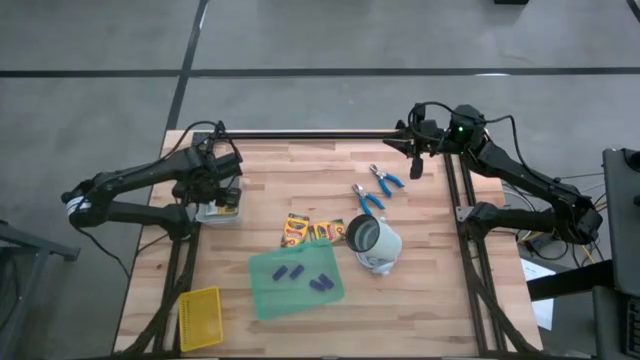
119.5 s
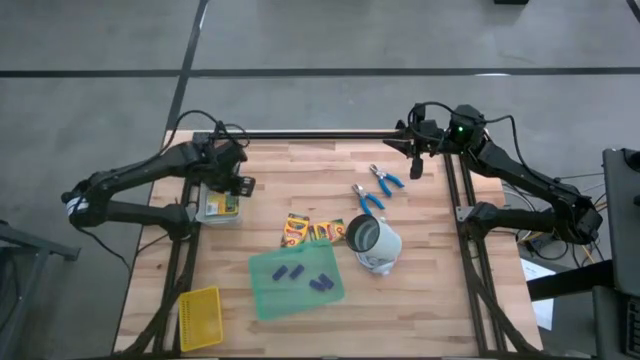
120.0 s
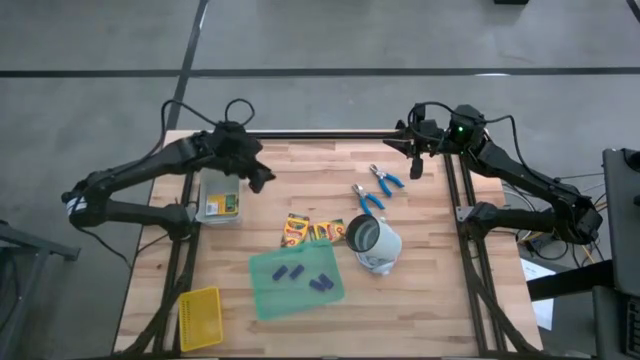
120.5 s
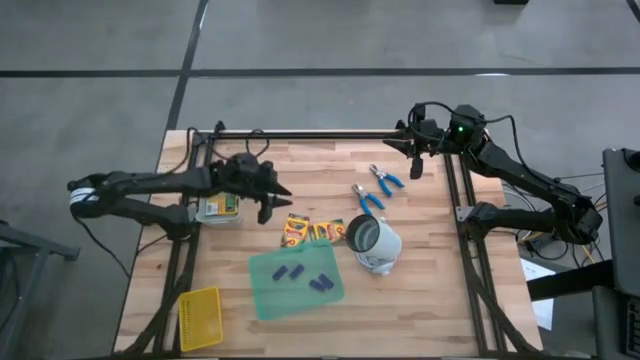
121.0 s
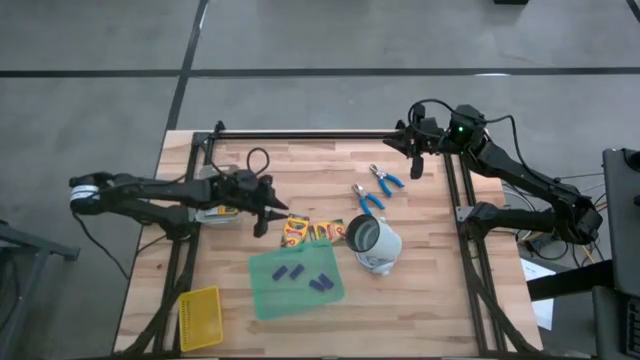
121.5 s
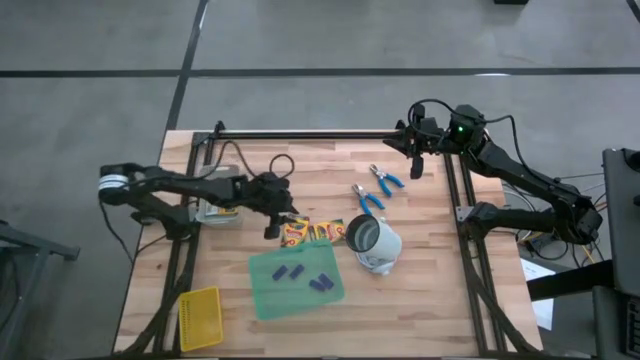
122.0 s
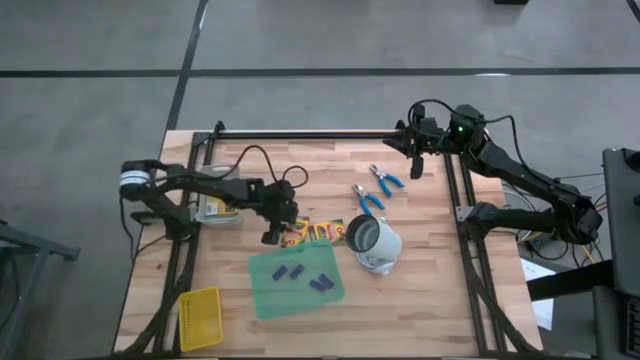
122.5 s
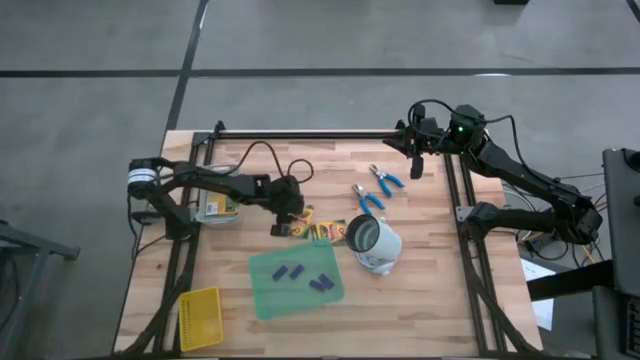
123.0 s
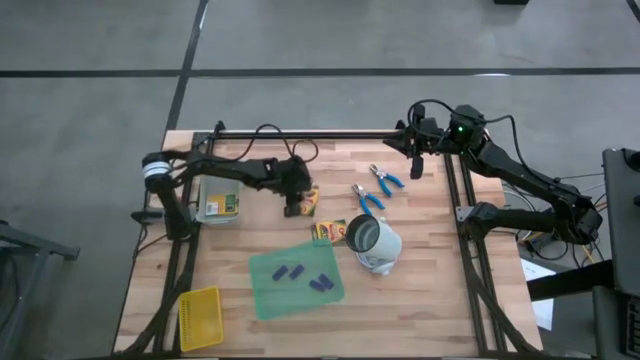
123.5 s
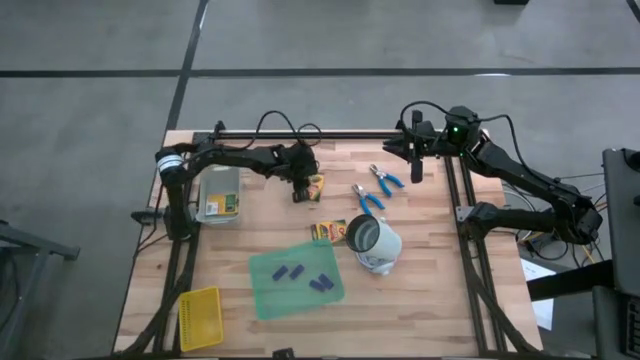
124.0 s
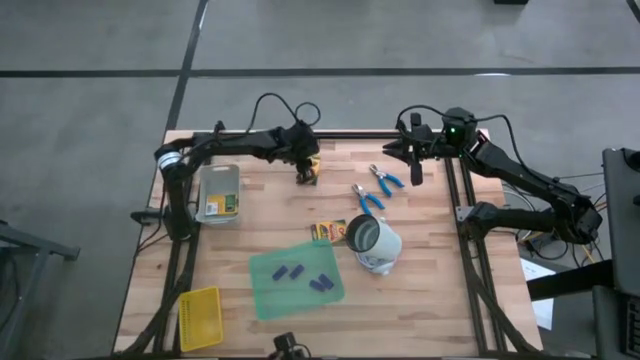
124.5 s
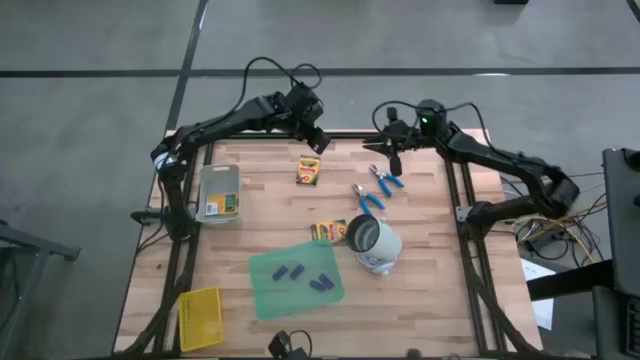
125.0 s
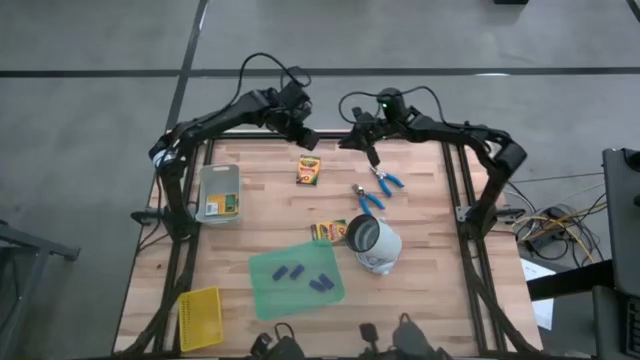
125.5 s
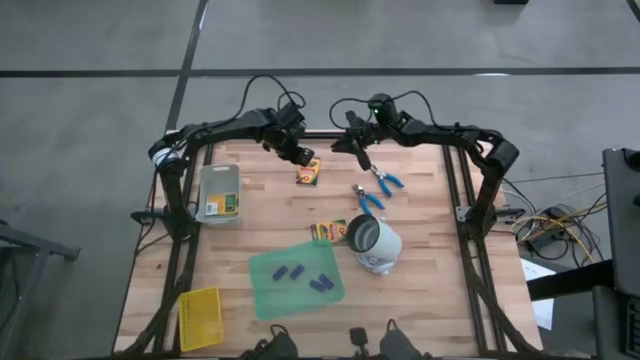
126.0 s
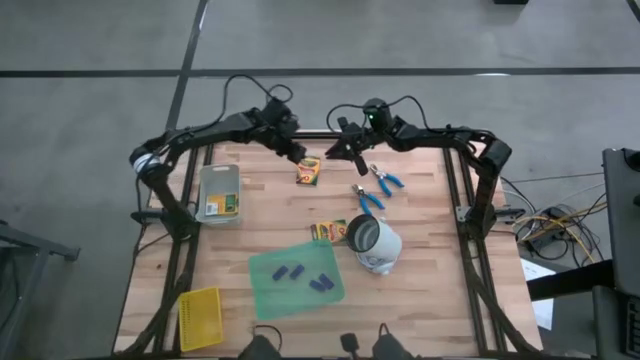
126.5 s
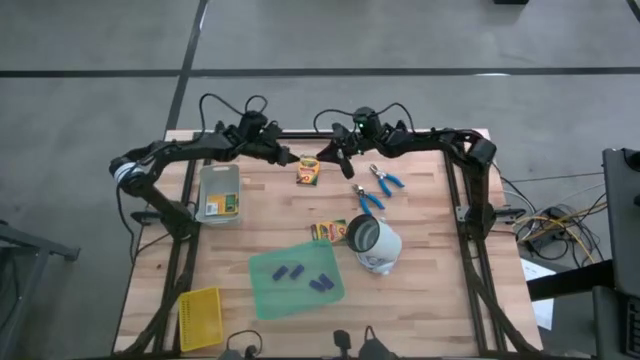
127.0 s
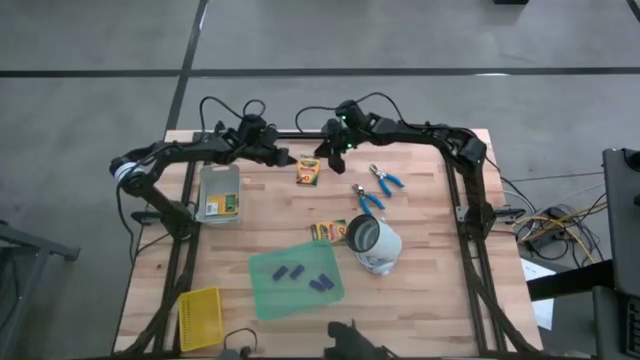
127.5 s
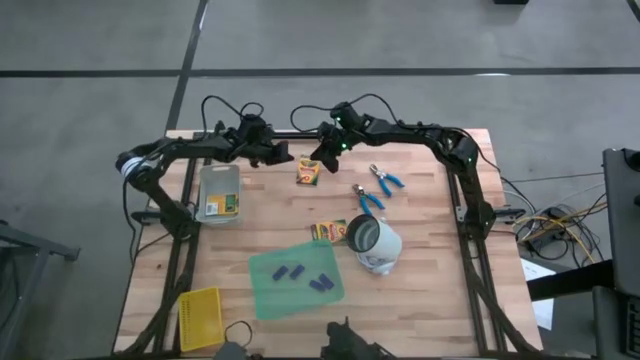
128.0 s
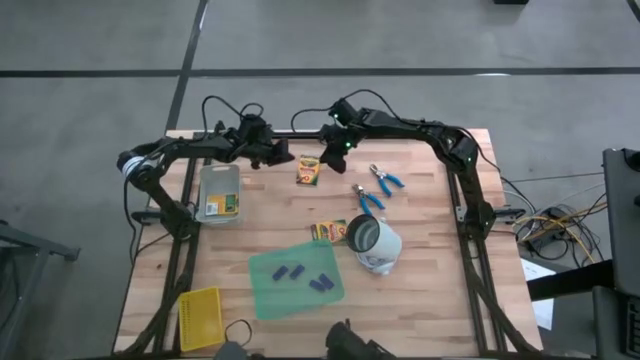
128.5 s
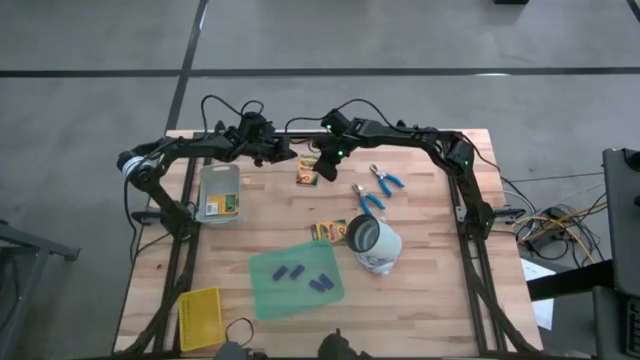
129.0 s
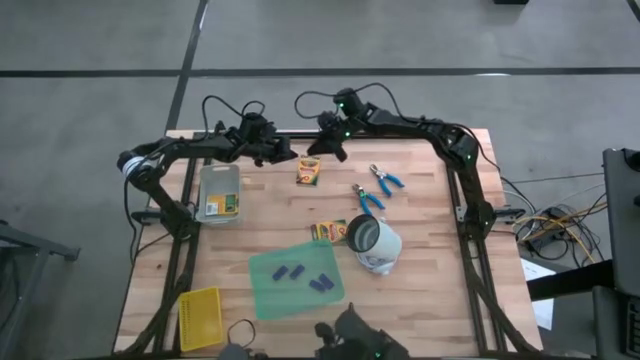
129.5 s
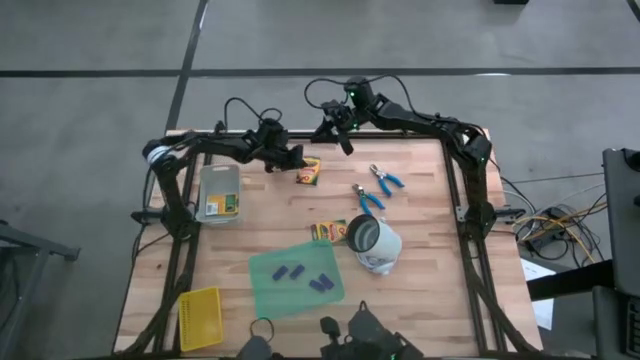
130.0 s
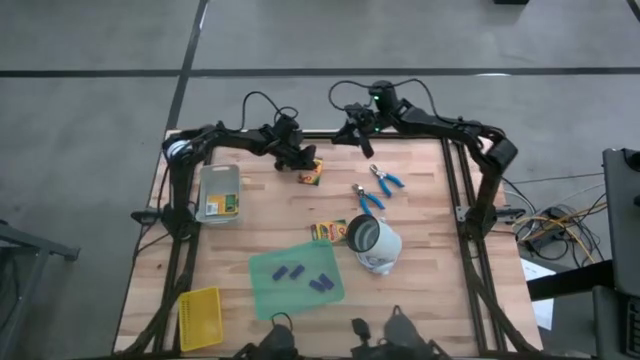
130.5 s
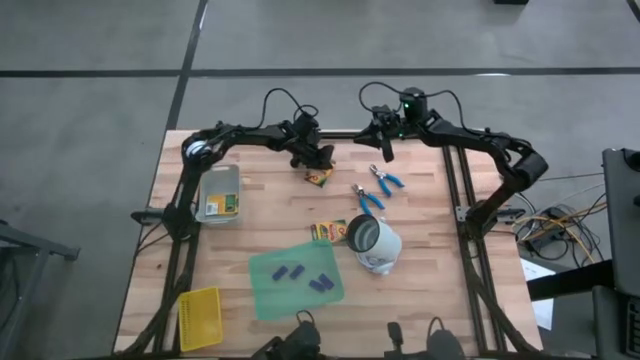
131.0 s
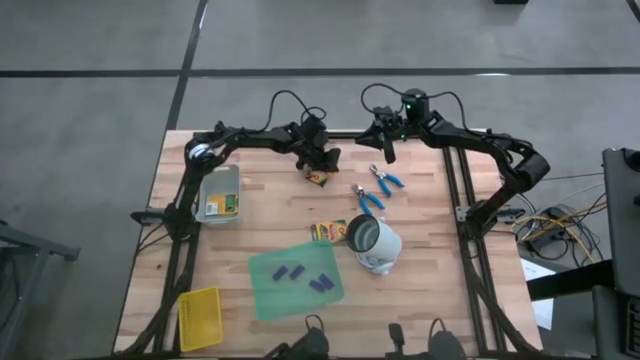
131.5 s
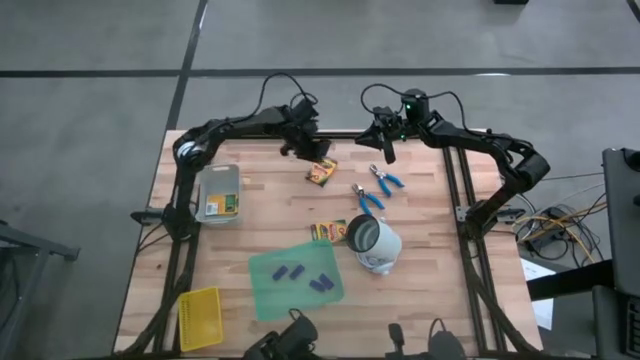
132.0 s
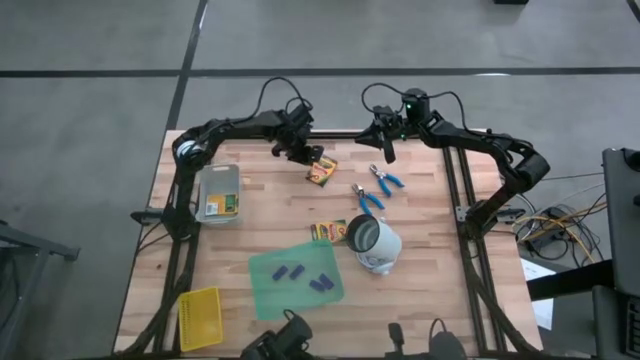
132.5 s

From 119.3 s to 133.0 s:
Task: Pick & Place School Supplies
Put the yellow crayon box into the gray bin

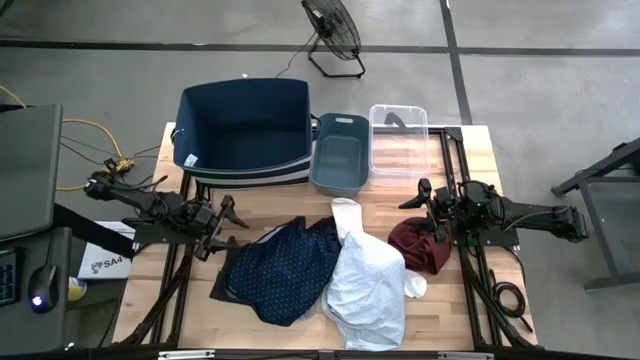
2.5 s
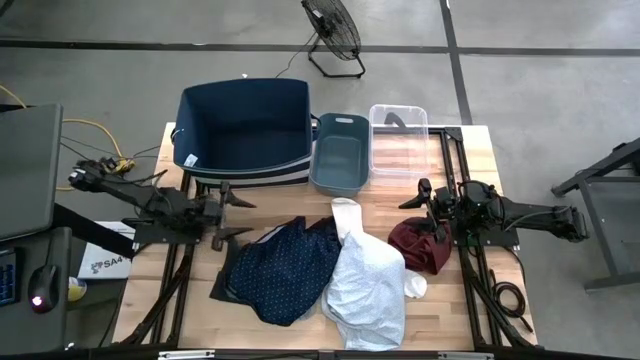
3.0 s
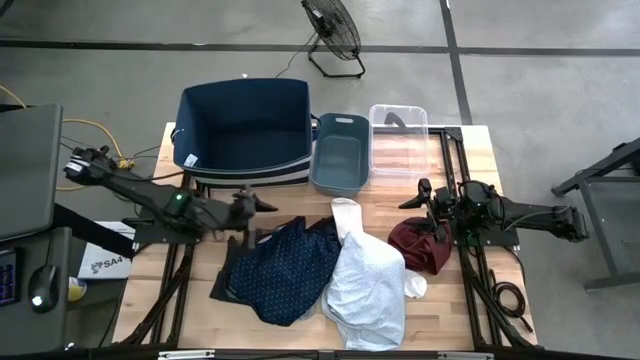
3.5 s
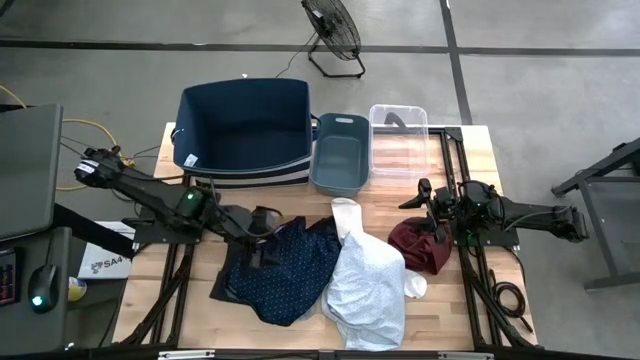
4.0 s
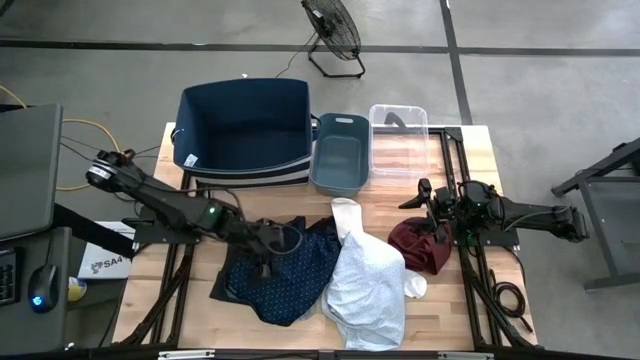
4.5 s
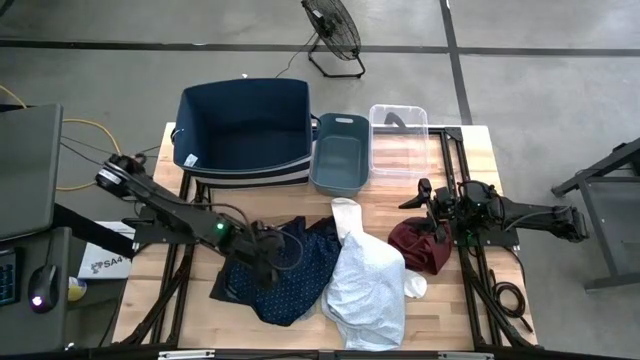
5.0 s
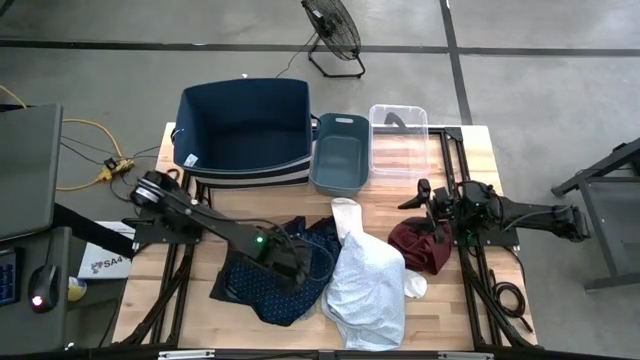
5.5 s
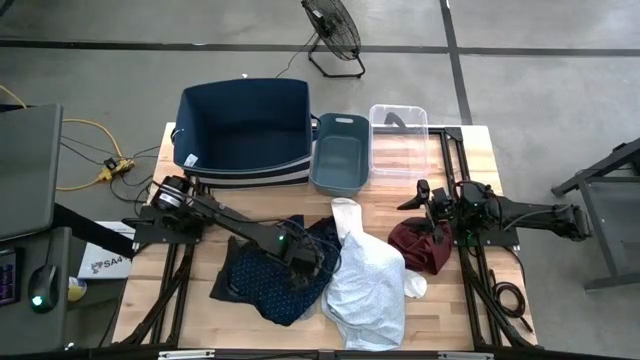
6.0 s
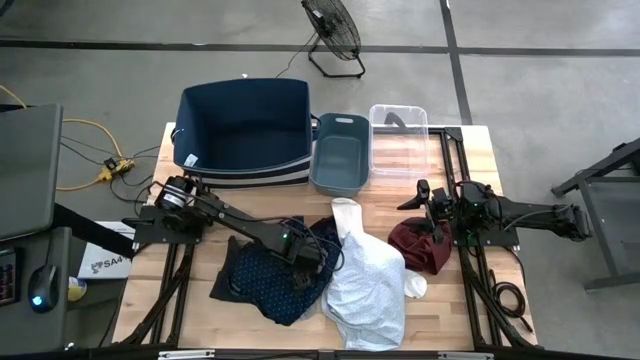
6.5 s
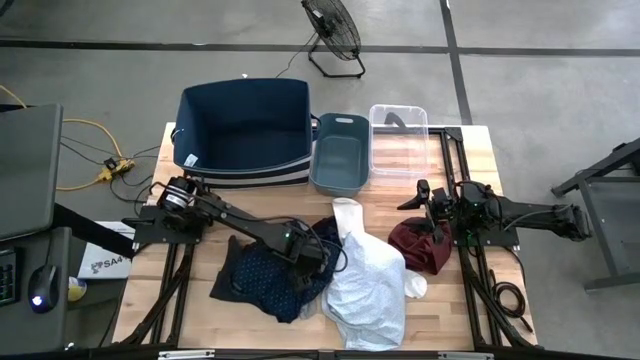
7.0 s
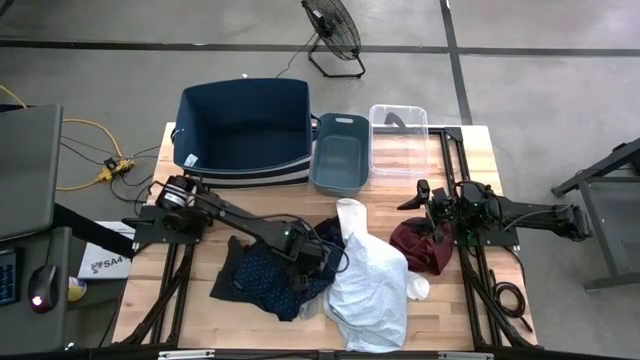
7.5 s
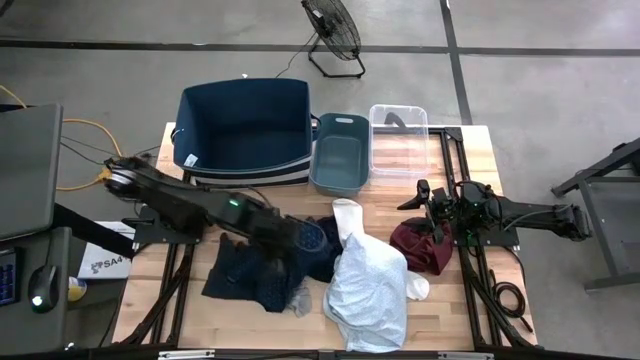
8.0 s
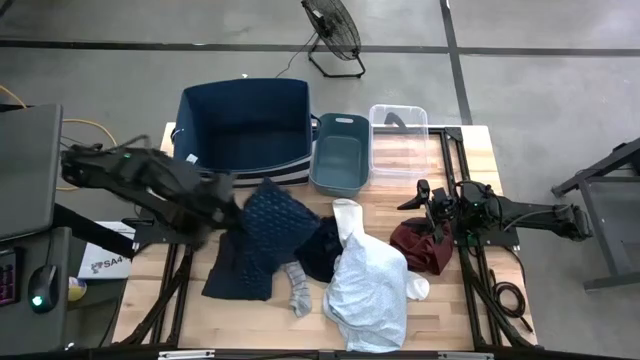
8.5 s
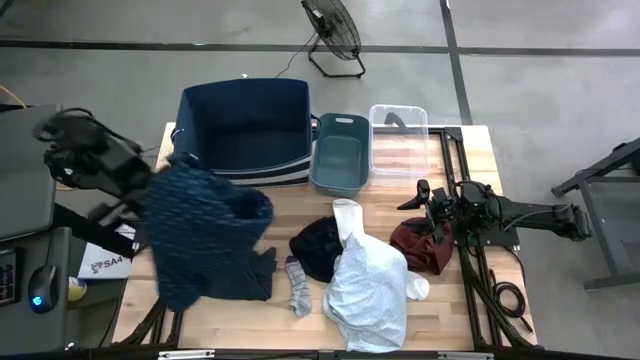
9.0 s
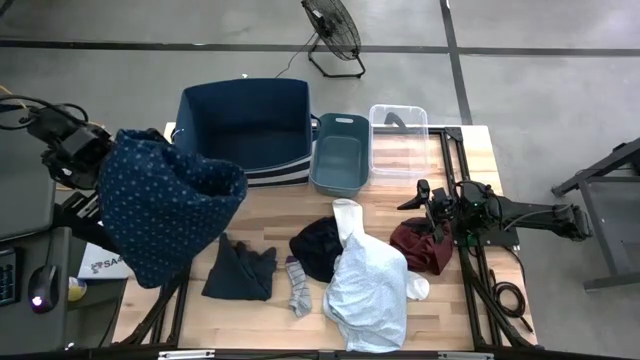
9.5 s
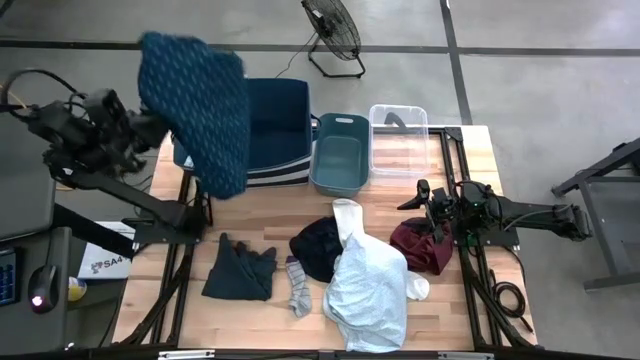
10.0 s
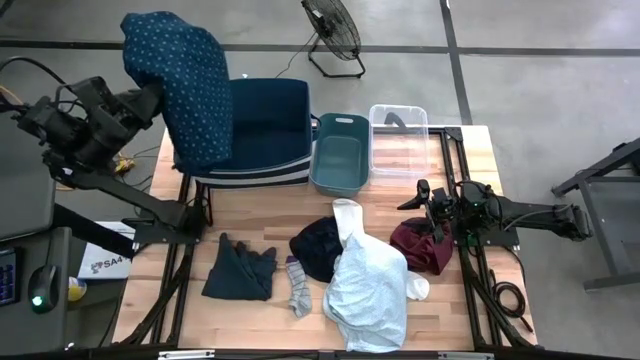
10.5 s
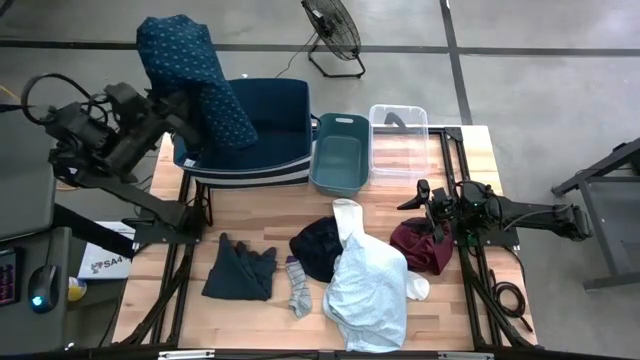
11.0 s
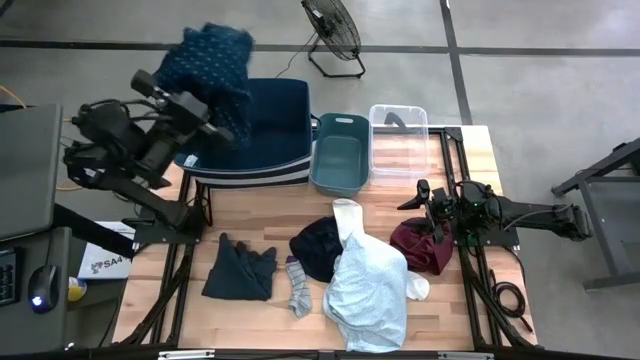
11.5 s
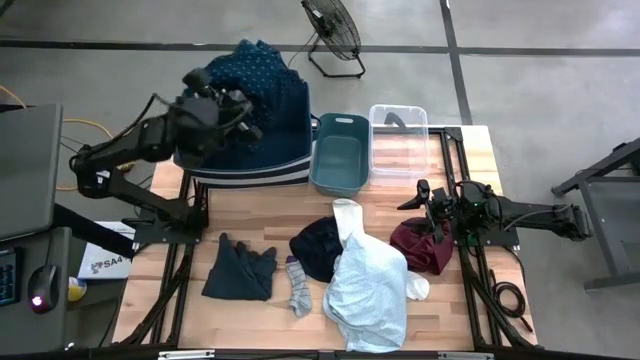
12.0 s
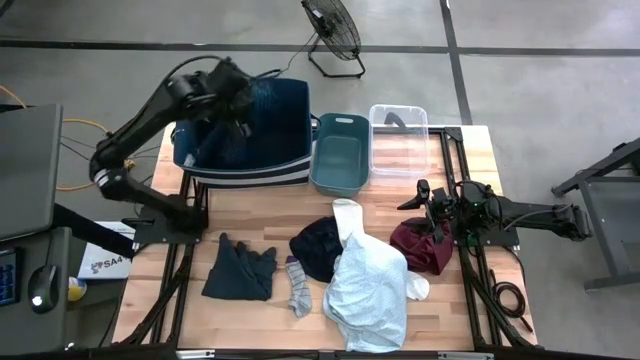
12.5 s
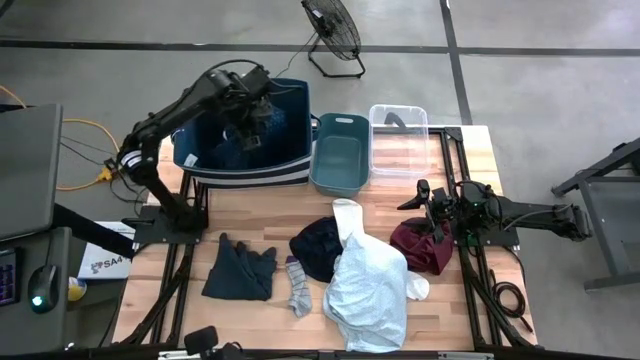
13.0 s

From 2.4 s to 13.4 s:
Task: Pick & Place Cloths
Put the blue shirt into the dark blue bin
